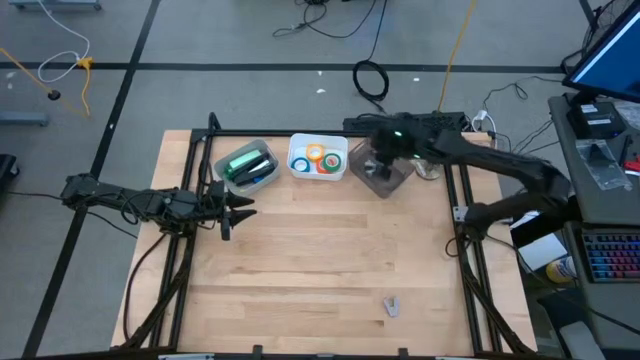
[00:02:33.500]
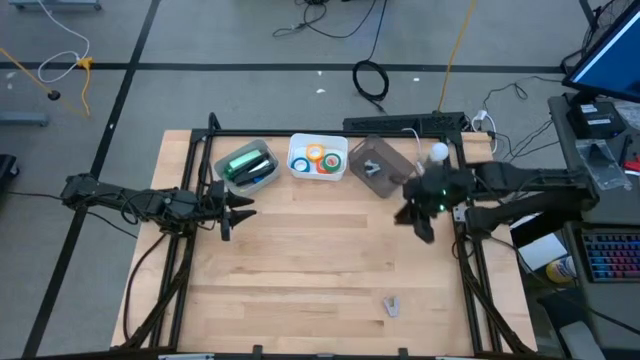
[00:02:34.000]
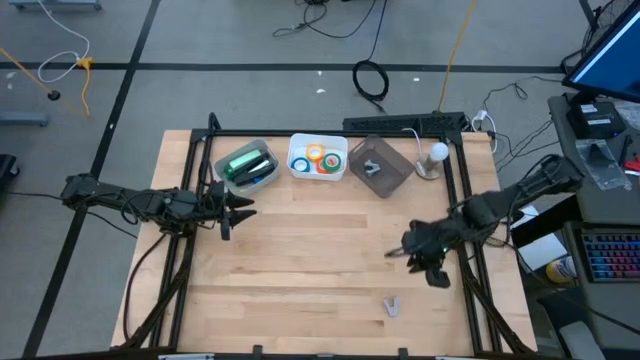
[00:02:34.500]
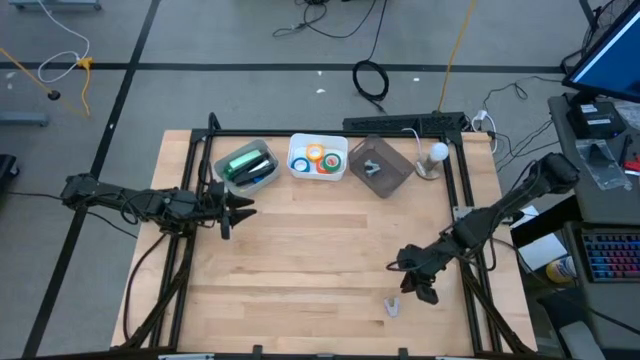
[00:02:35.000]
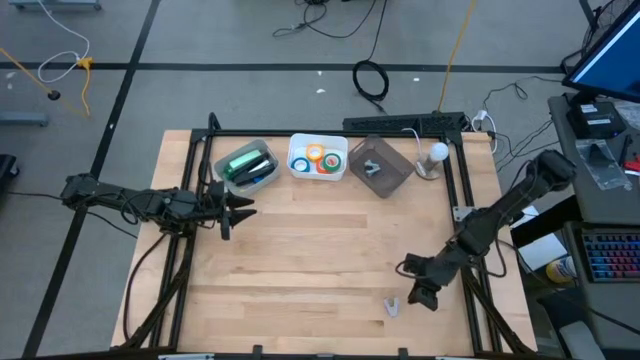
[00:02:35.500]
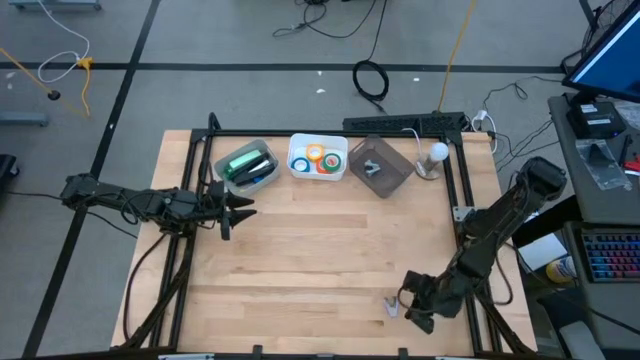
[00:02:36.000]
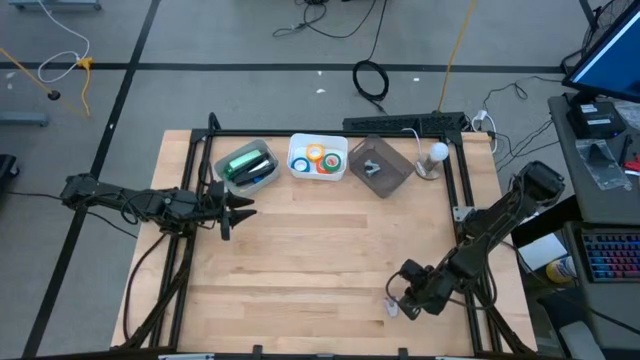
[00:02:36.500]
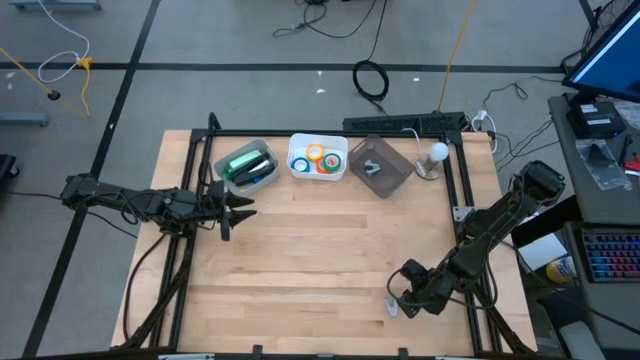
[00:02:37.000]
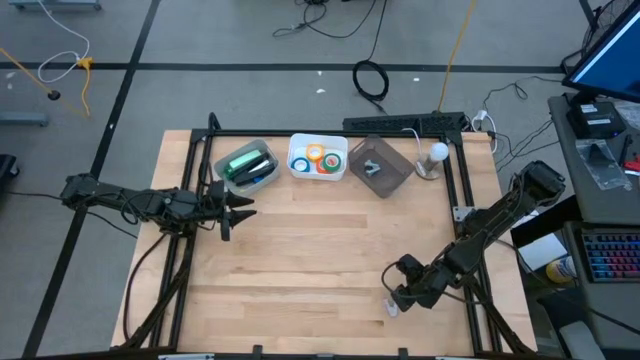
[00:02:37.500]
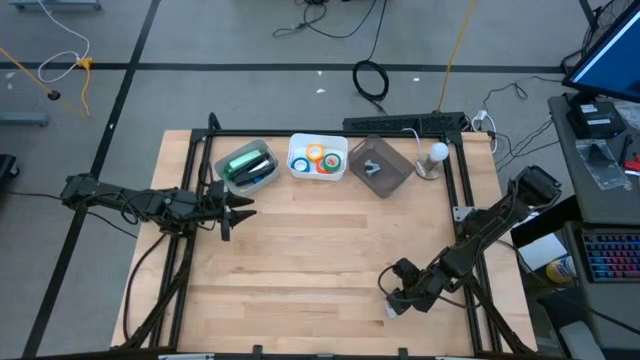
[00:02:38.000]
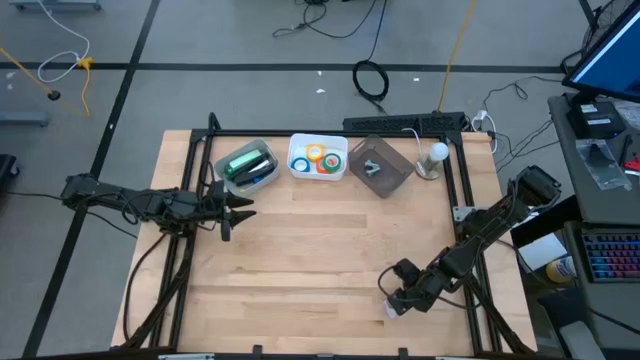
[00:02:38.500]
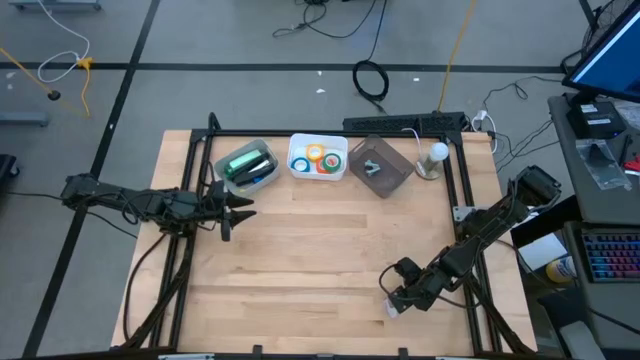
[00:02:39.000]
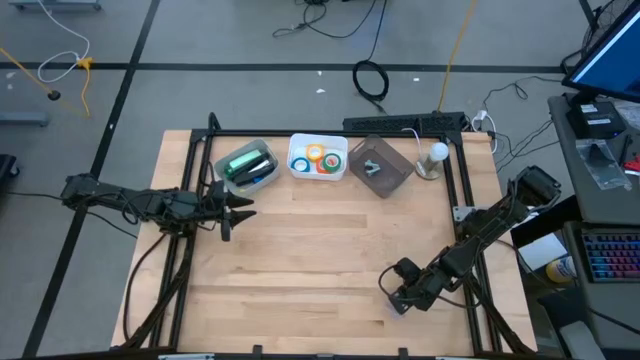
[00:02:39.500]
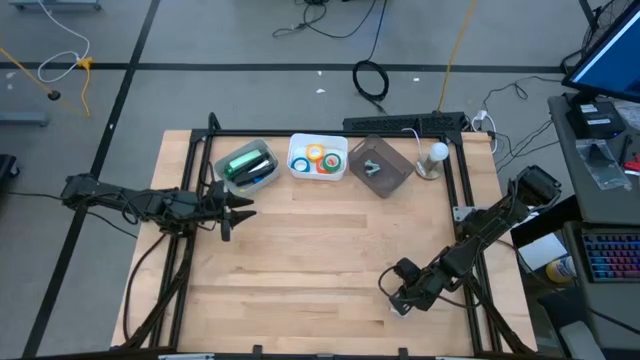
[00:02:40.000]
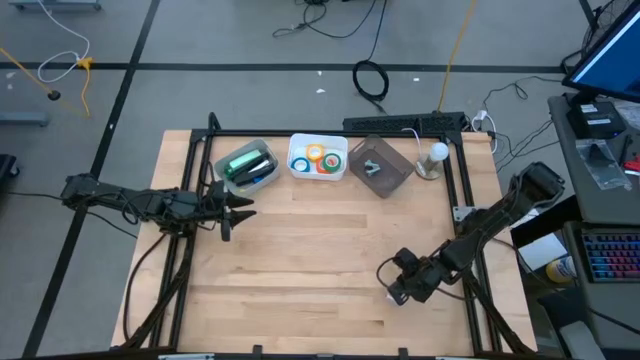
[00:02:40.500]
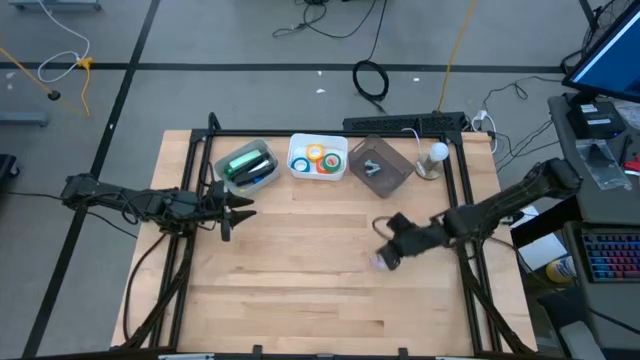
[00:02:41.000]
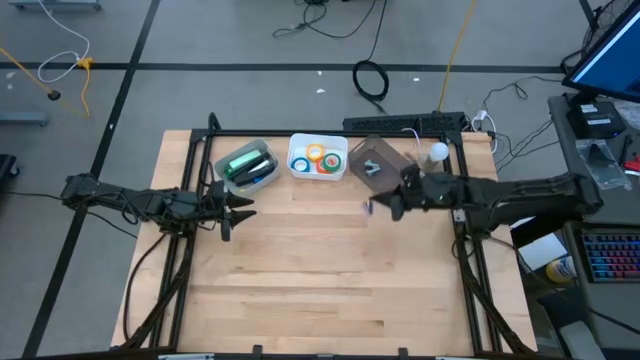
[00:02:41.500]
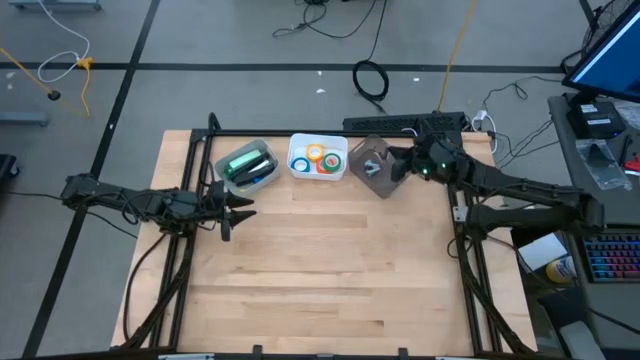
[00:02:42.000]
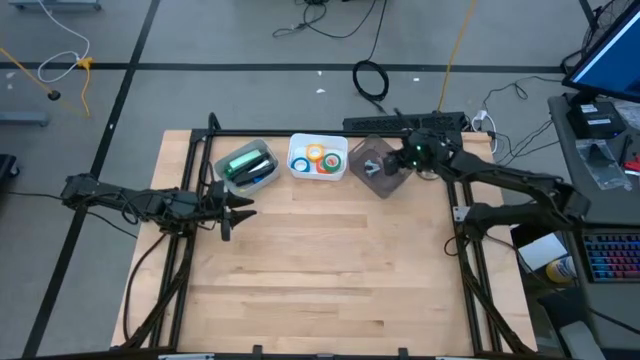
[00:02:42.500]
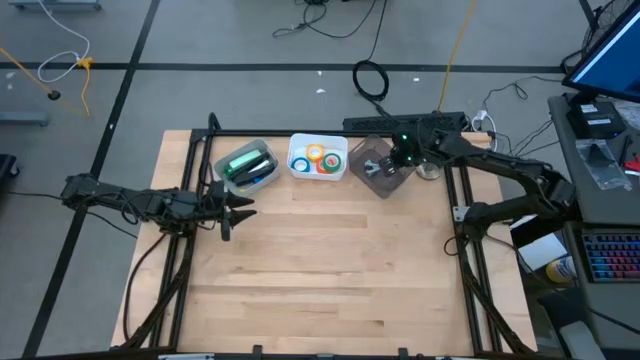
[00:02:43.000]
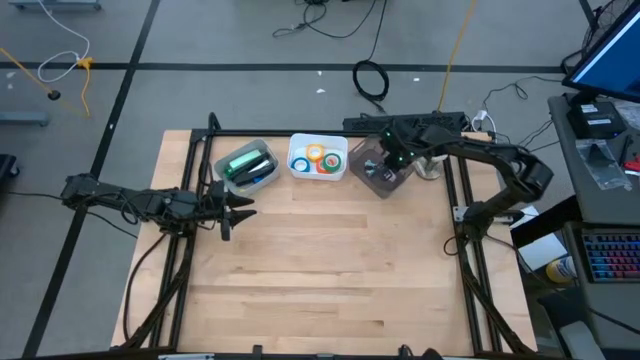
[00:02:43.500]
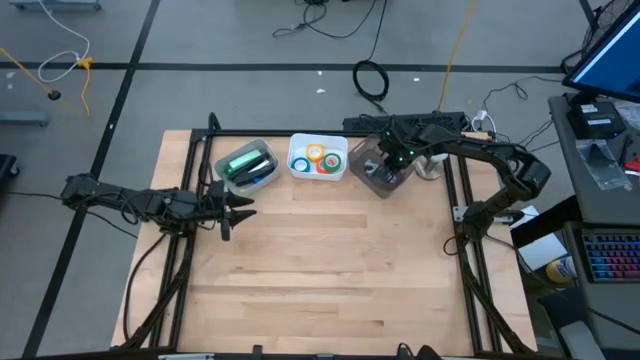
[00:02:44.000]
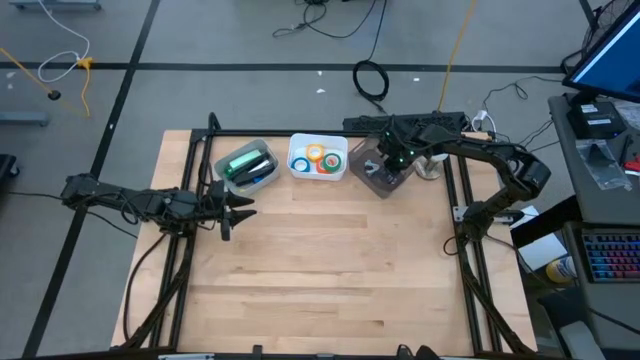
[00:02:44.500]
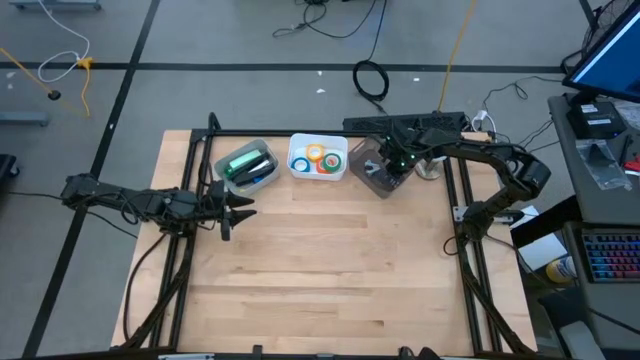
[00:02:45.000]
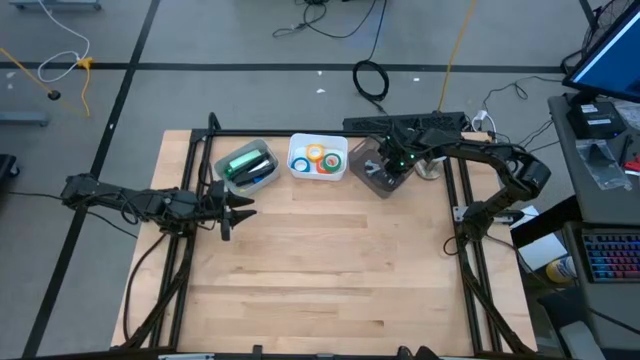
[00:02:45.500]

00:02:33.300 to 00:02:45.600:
Task: Pick and place Stapler, Stapler remover, tape
Put the purple staple remover into the black bin

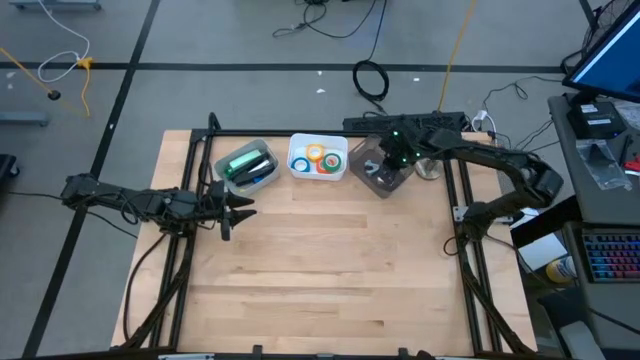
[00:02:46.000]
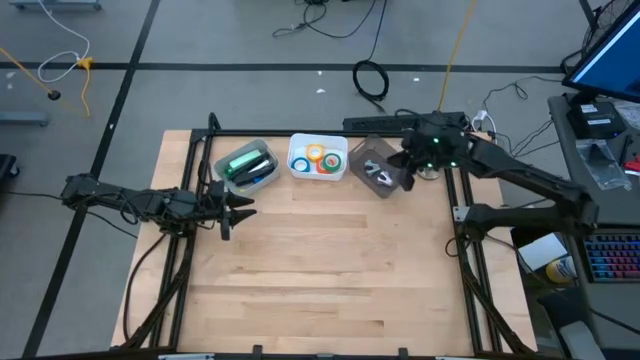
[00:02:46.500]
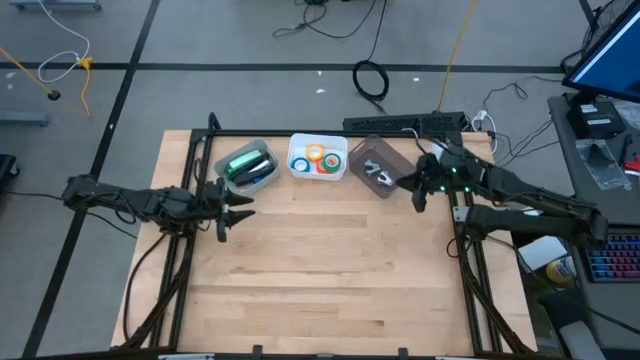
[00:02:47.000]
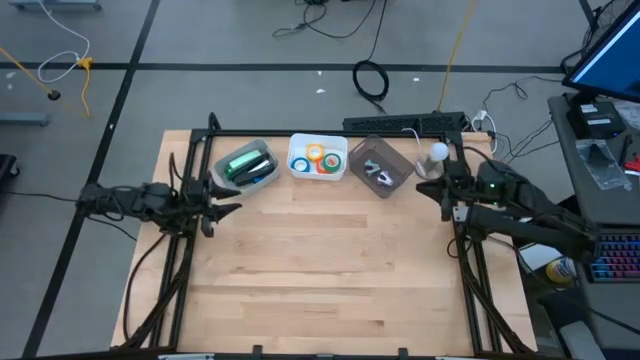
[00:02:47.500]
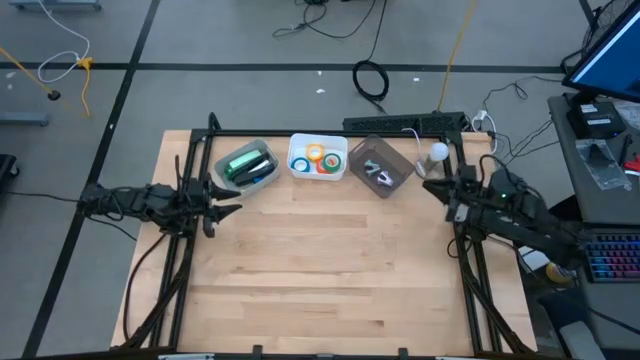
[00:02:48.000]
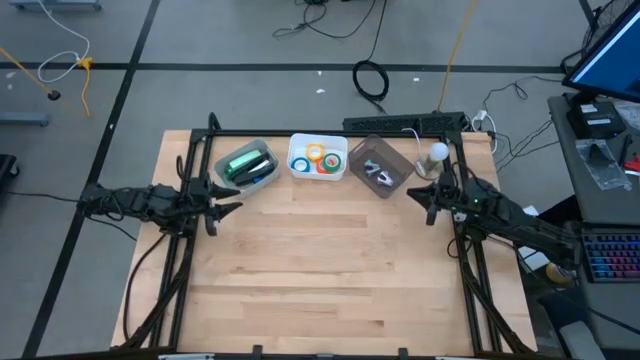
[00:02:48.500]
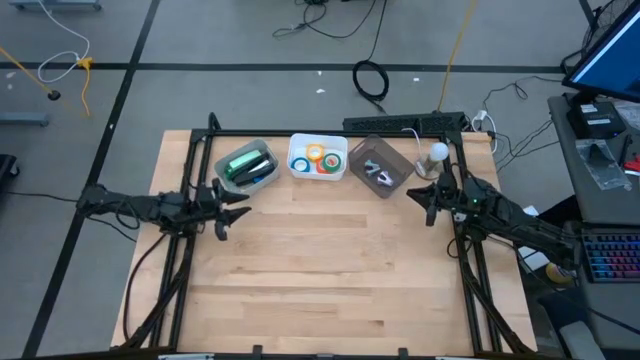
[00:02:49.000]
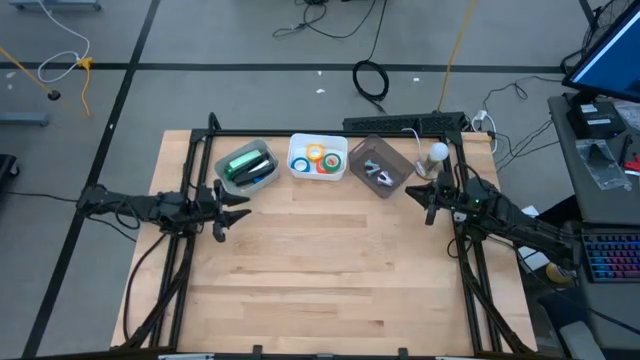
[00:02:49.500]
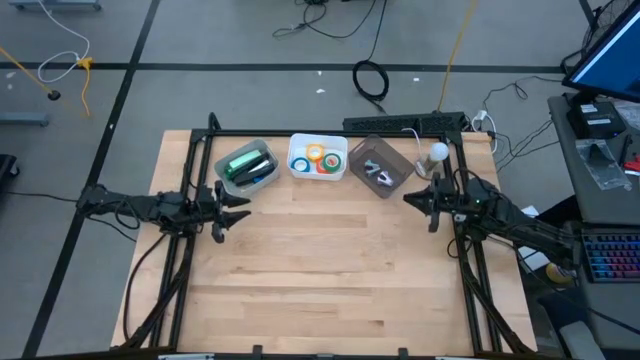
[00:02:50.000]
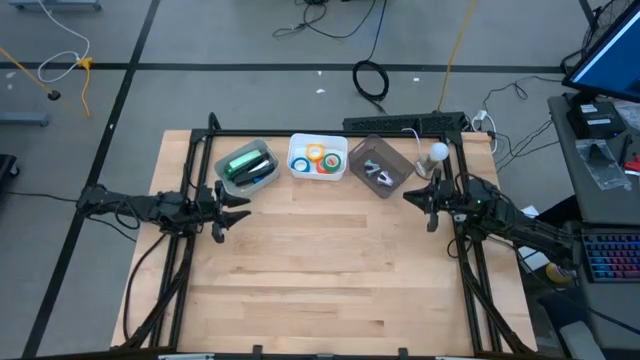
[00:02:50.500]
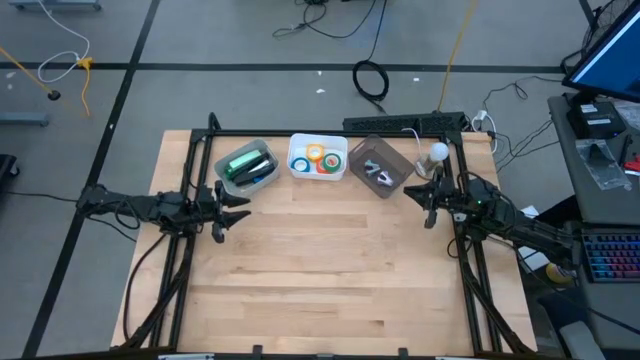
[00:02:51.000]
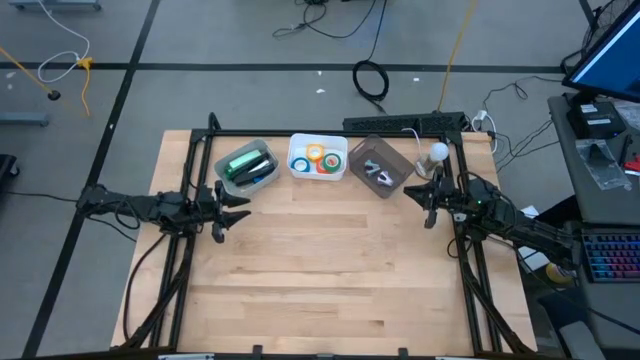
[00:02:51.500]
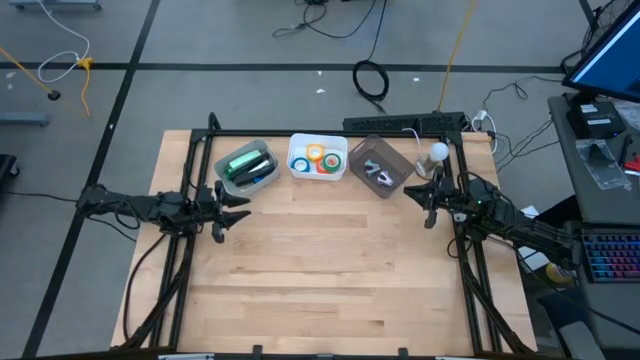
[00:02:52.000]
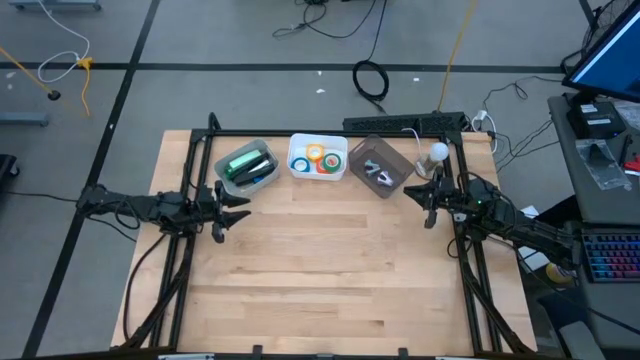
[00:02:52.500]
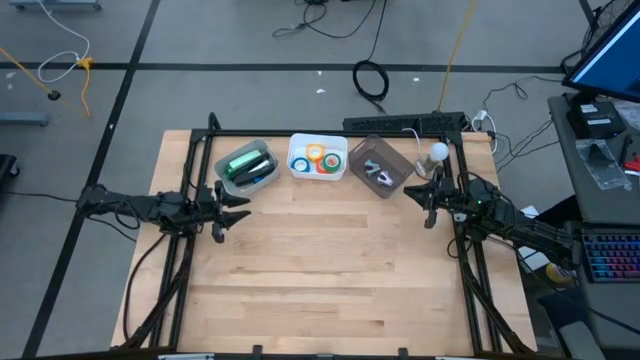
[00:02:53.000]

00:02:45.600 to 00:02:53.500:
Return to Home Position

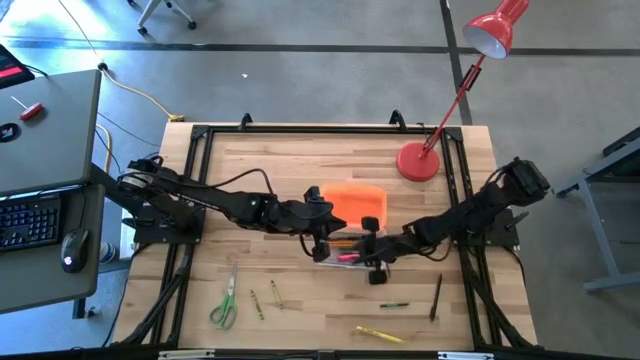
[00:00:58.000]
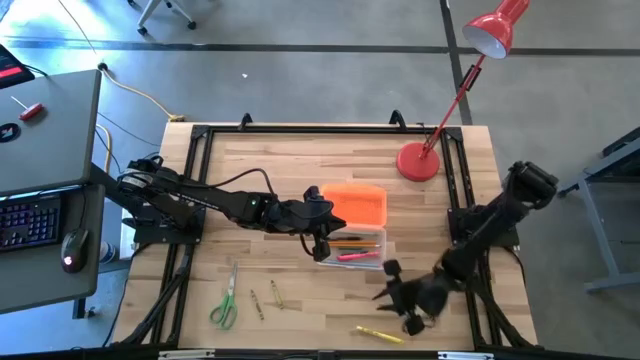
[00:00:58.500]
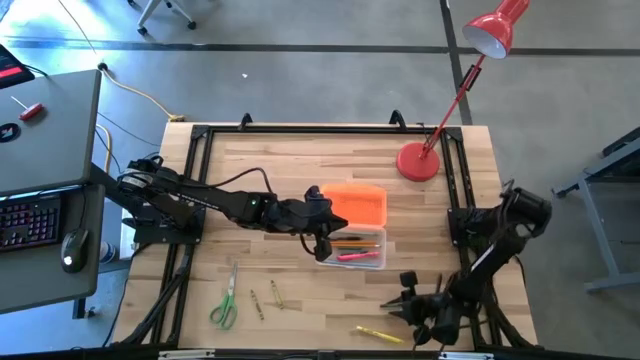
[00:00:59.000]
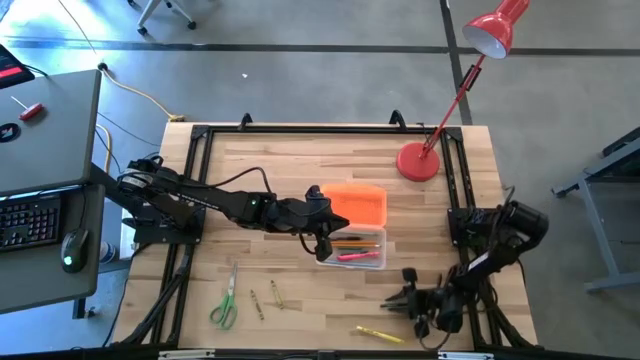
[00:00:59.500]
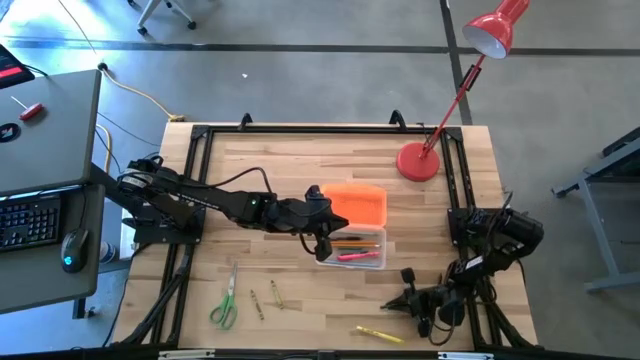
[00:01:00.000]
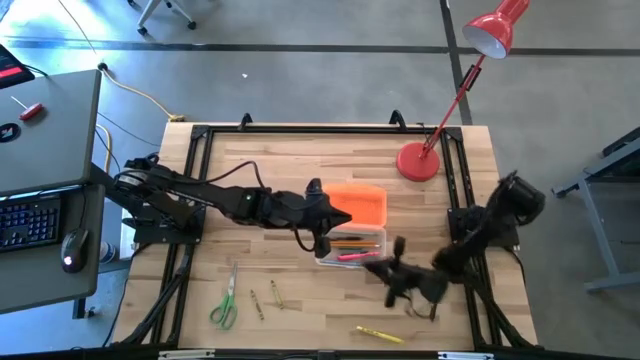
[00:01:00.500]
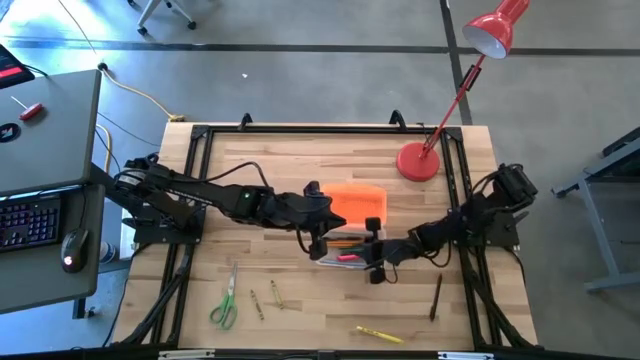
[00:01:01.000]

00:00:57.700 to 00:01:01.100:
Task: Pick & place school supplies into a supply box
Put the dark green crayon into the supply box
